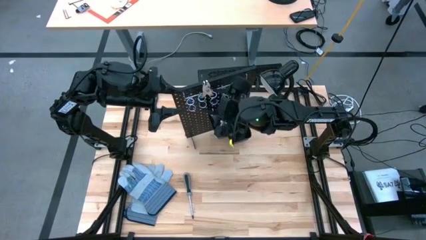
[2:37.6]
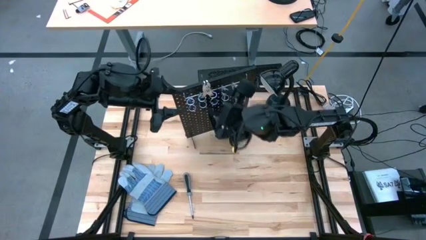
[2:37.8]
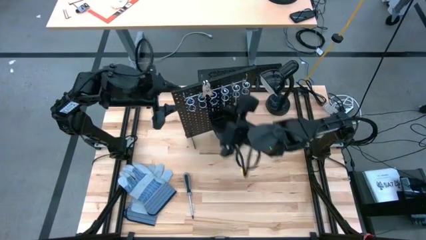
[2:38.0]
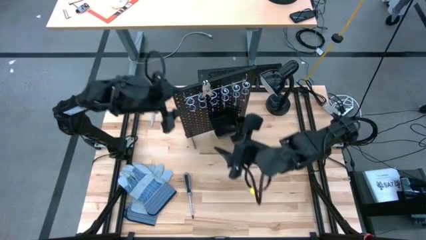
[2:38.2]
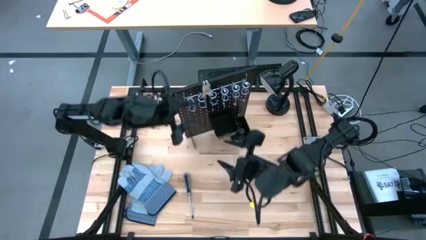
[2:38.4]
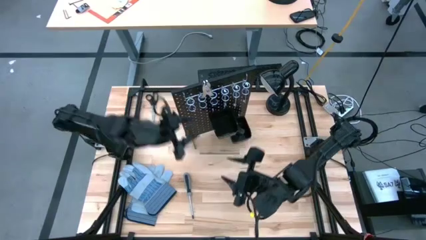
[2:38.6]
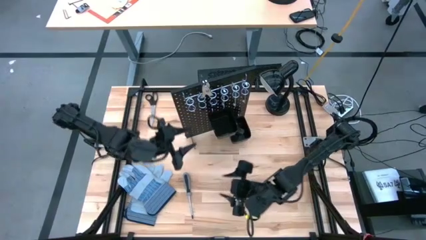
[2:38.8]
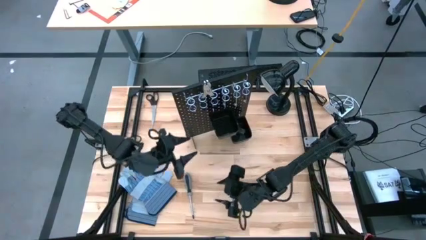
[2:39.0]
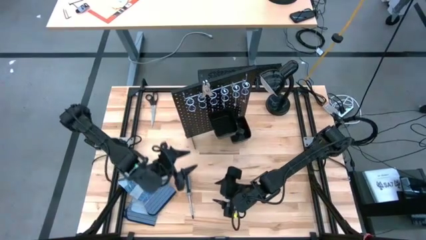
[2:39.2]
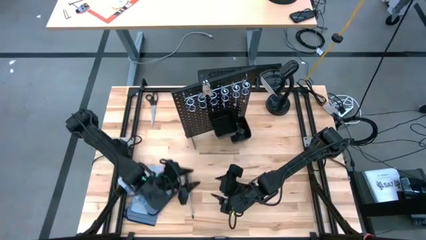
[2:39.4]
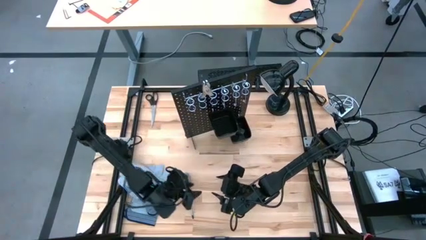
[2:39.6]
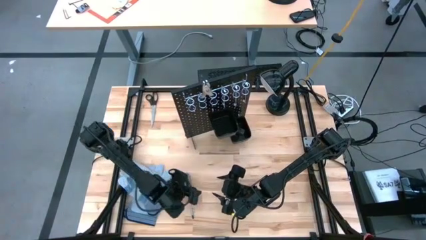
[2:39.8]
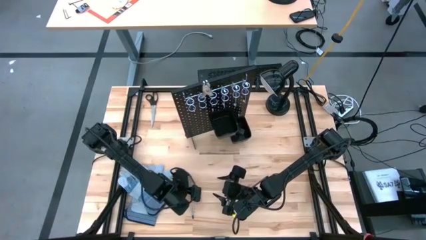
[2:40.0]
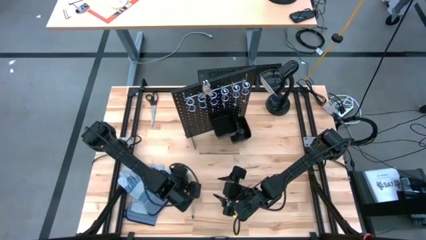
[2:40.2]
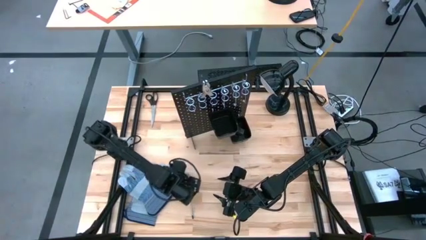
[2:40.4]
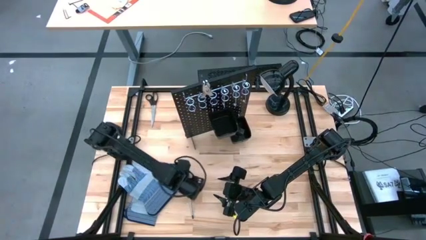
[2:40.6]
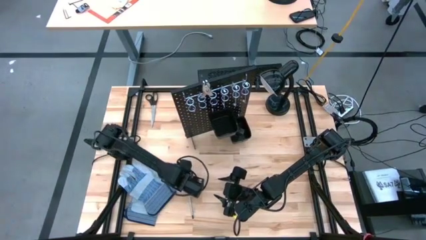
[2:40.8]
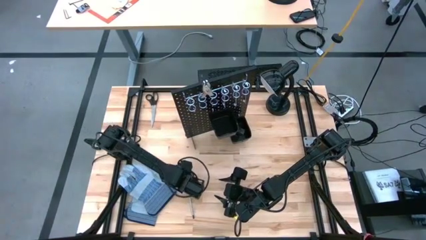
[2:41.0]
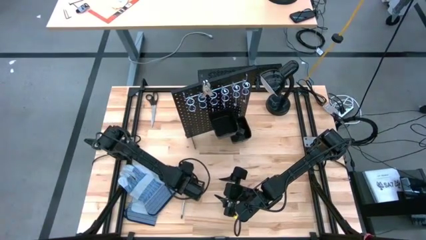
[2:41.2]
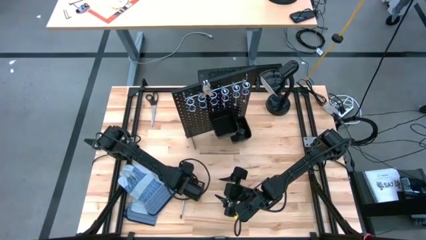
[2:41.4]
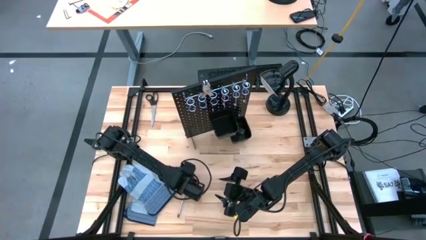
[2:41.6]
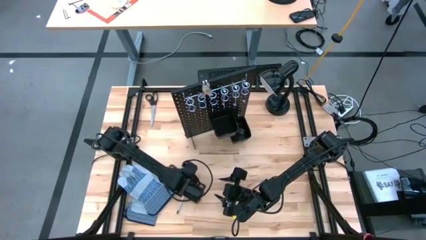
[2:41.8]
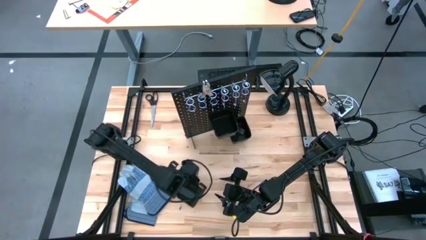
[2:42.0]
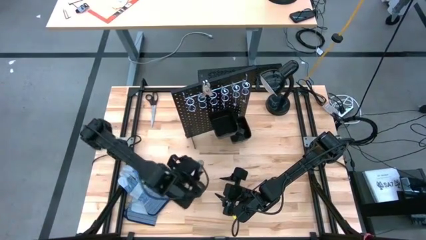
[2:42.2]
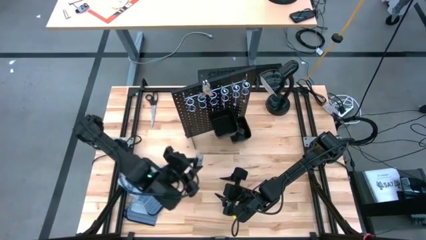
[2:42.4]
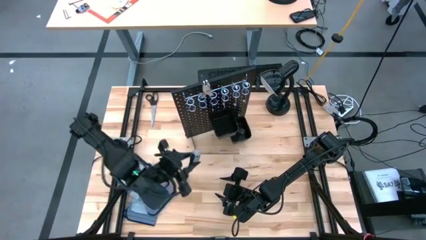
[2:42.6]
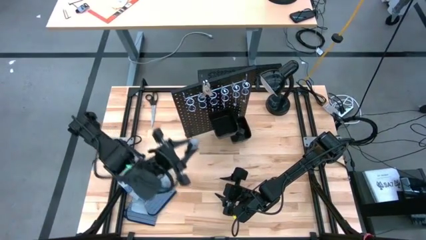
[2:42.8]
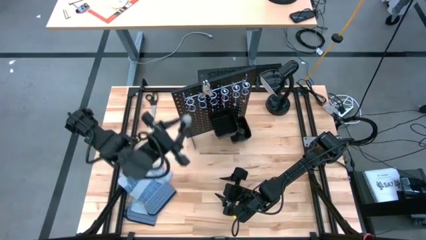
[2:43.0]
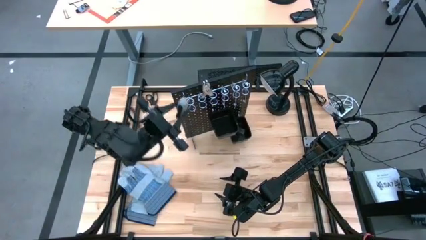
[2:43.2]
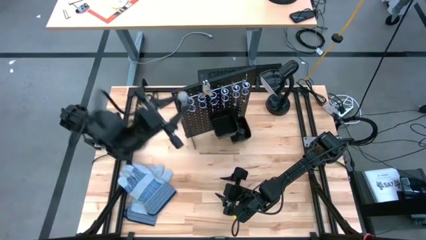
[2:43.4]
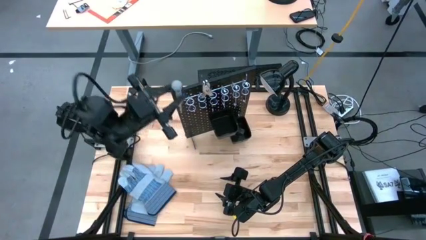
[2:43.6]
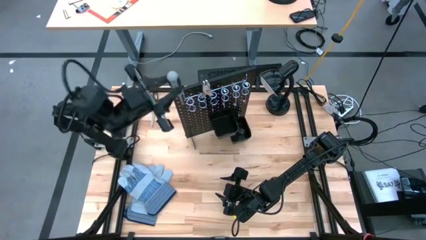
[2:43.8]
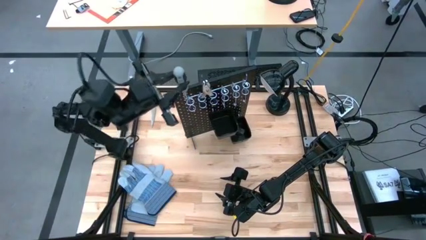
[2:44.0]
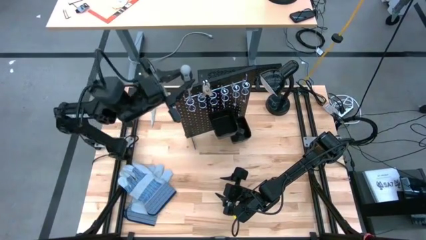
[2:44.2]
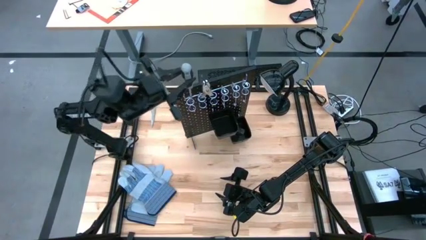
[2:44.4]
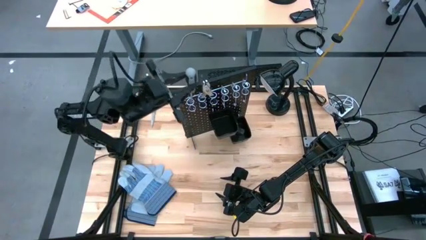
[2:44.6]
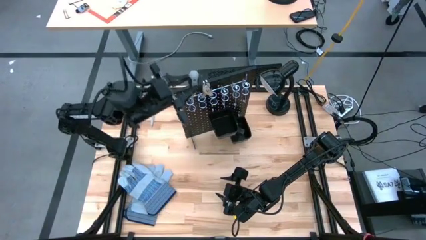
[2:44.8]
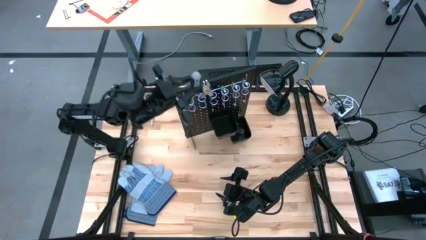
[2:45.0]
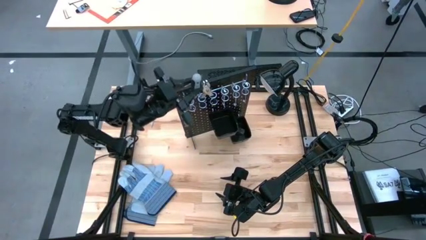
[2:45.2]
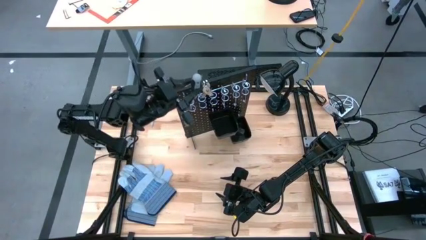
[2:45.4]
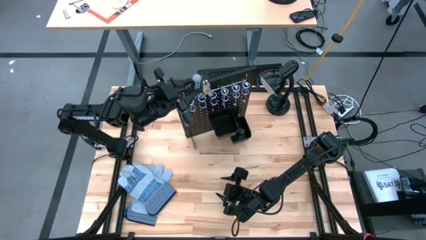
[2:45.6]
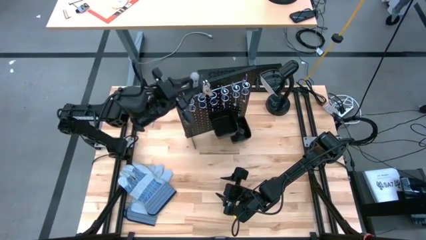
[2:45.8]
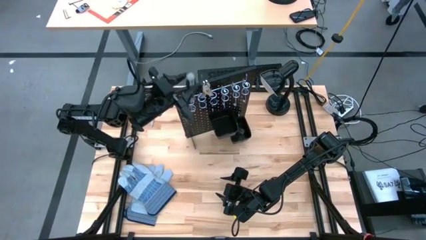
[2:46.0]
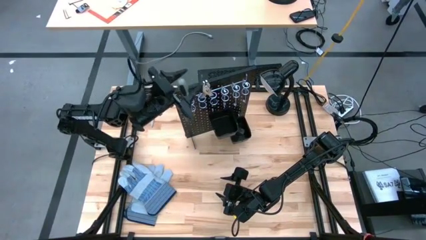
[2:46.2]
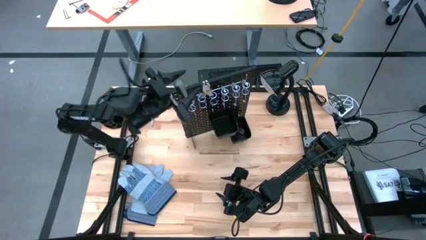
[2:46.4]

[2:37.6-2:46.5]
Task: Hang tools onto peg board
Hang the gray screwdriver on the black pegboard

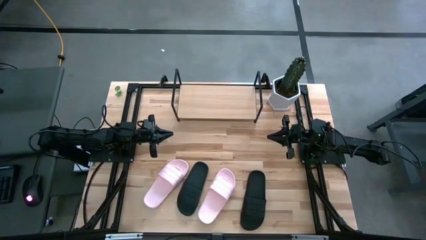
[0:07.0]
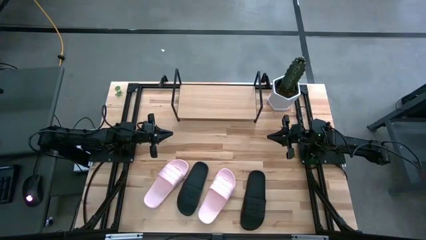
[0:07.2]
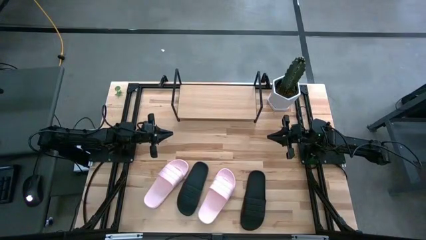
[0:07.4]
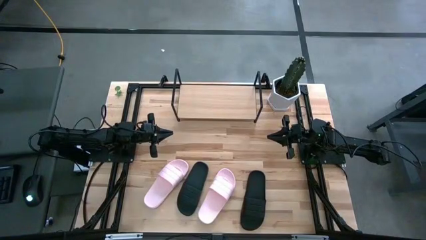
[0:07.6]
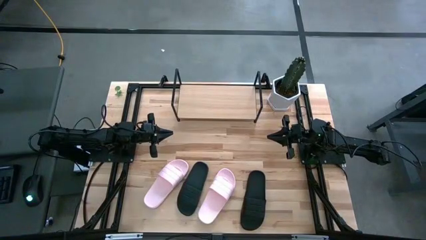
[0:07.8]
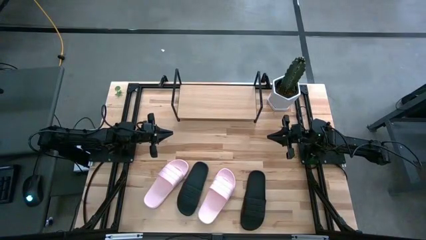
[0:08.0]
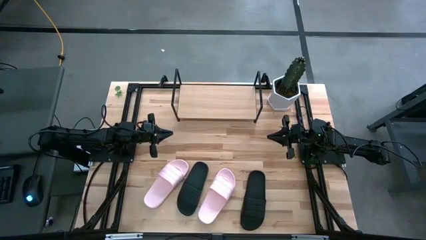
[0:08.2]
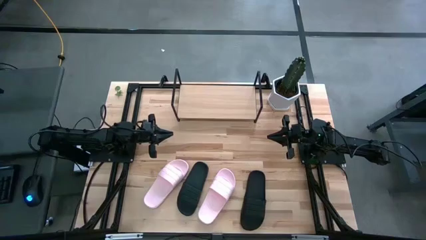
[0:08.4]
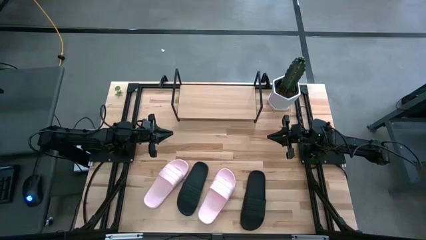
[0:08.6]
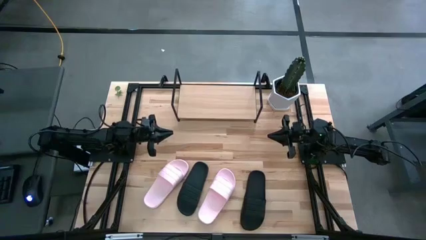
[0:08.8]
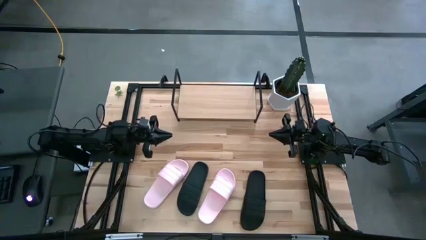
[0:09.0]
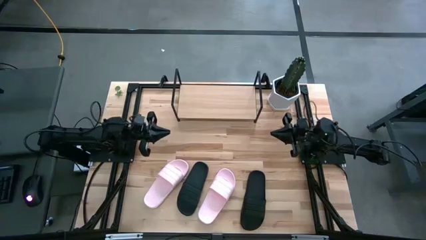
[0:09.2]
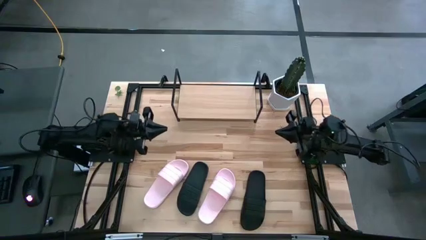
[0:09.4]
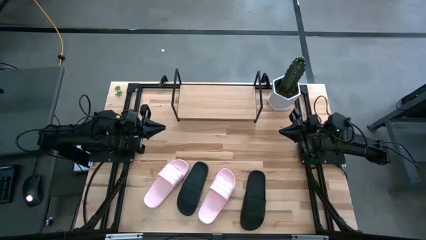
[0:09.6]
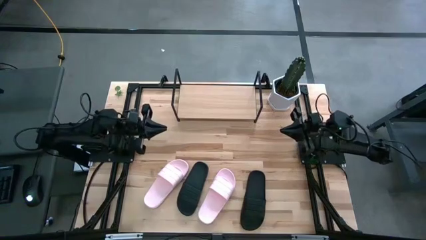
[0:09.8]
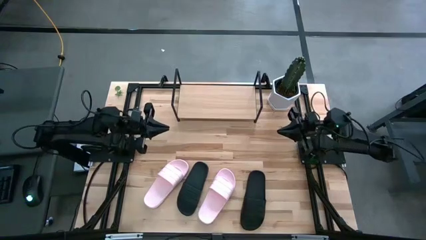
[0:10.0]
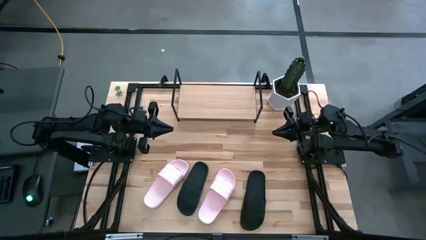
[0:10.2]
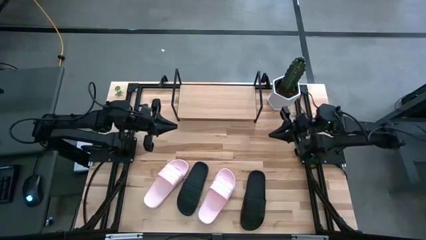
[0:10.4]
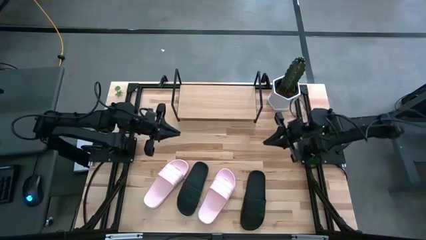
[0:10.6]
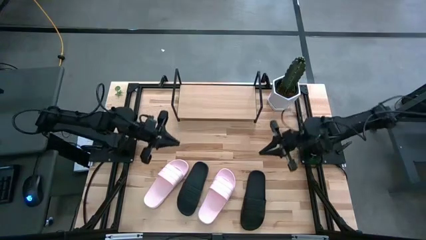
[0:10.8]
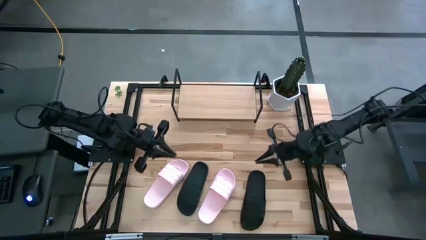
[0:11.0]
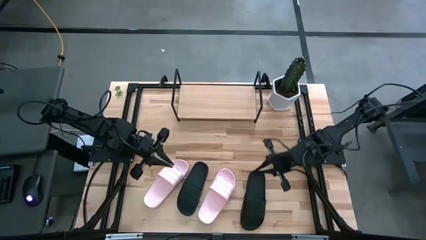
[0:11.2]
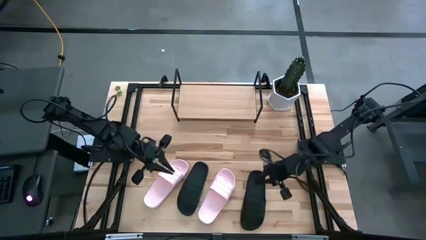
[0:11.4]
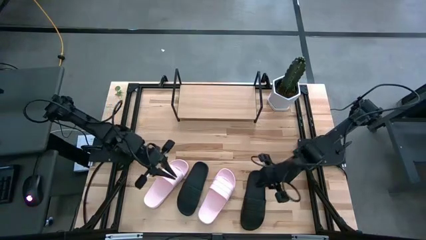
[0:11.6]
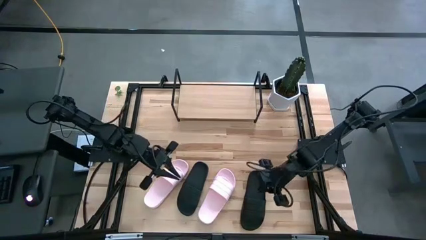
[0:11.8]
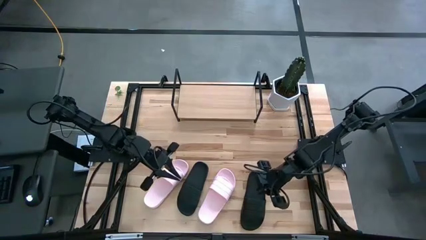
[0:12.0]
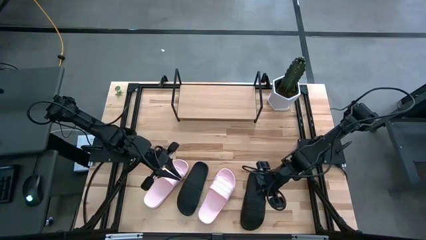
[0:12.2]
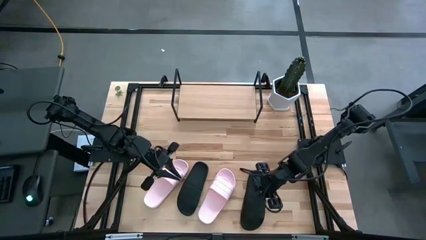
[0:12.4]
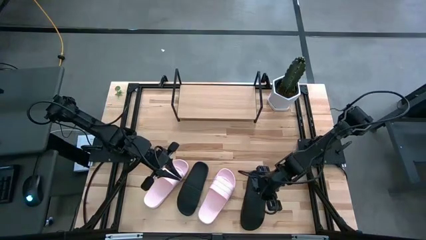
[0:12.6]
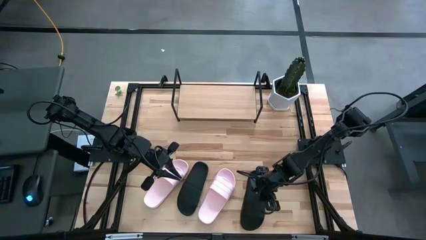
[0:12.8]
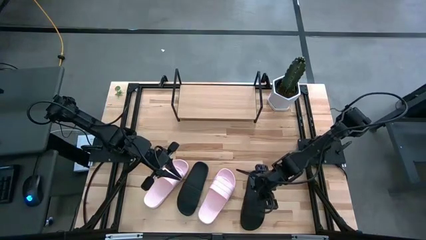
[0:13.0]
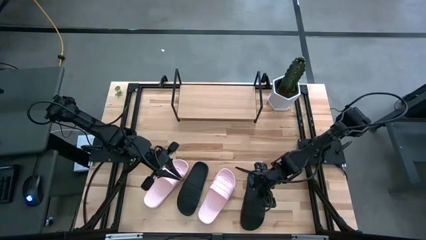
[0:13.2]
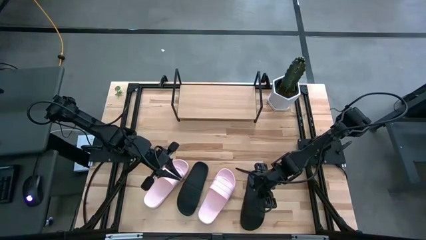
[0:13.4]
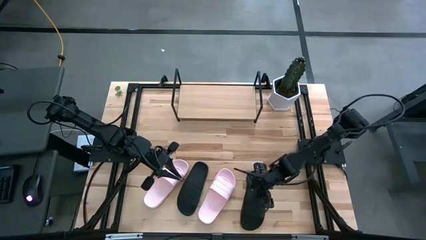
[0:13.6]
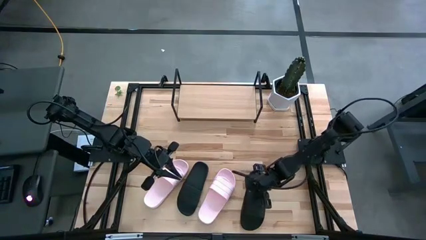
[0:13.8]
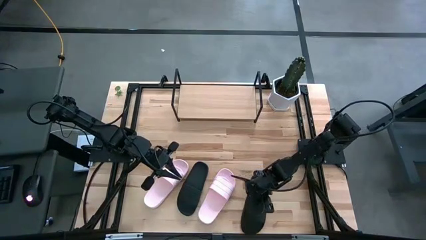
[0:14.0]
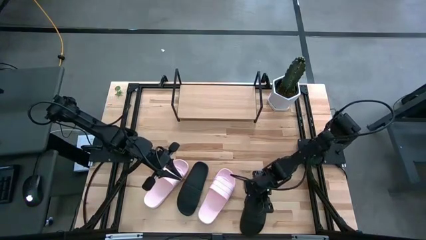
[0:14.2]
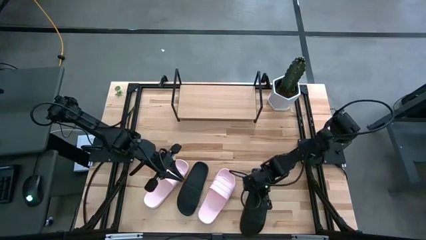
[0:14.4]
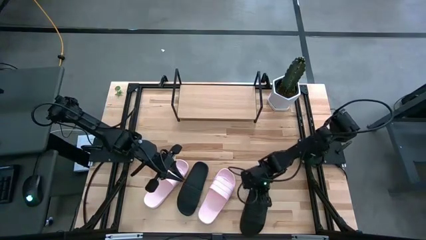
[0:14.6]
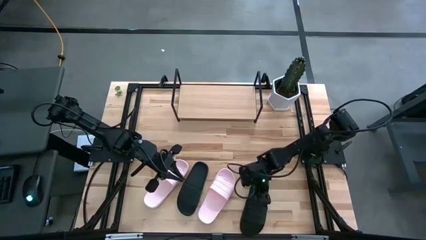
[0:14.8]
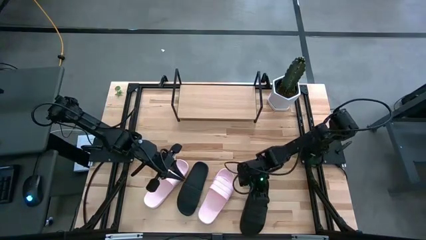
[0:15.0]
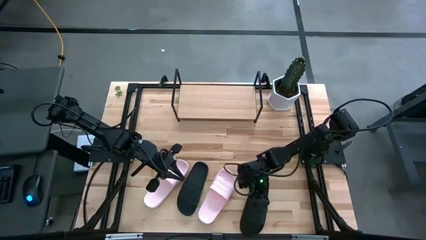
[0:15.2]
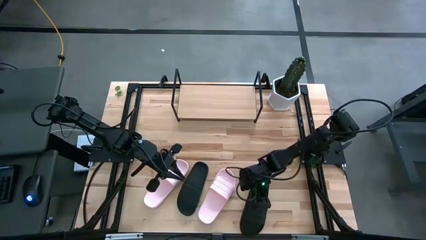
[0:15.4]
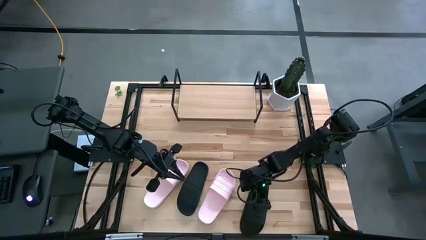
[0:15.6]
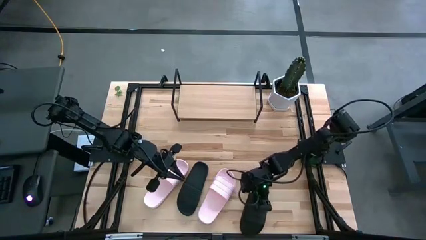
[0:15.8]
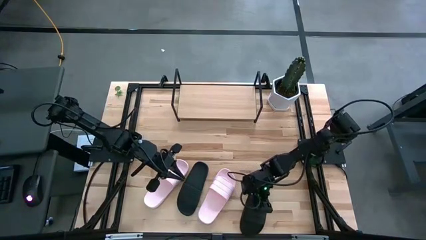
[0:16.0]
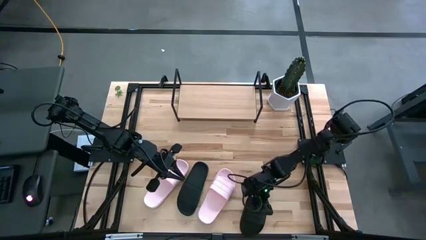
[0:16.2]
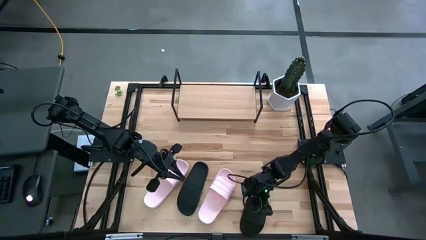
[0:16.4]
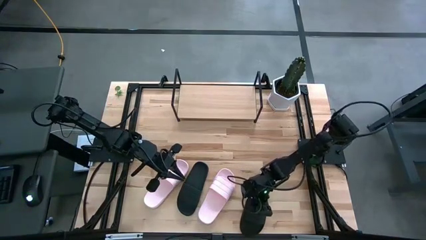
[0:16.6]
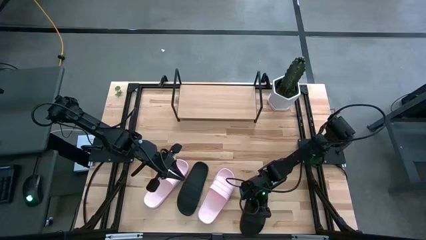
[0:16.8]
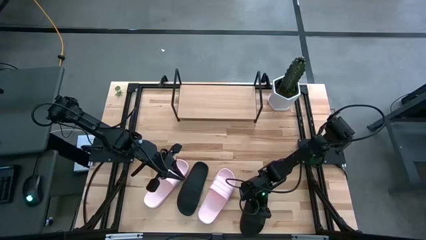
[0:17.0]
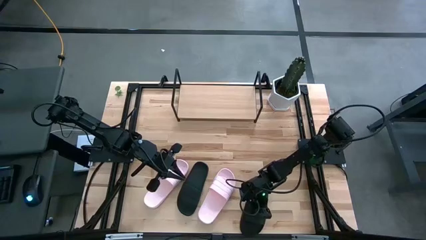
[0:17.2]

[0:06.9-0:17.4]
Task: Pick and place slides into the shelf
Put the right black slide on the shelf
